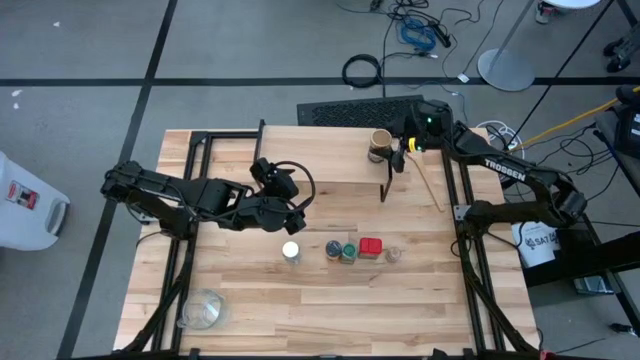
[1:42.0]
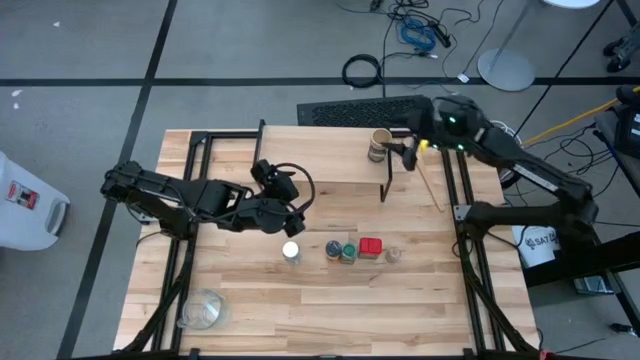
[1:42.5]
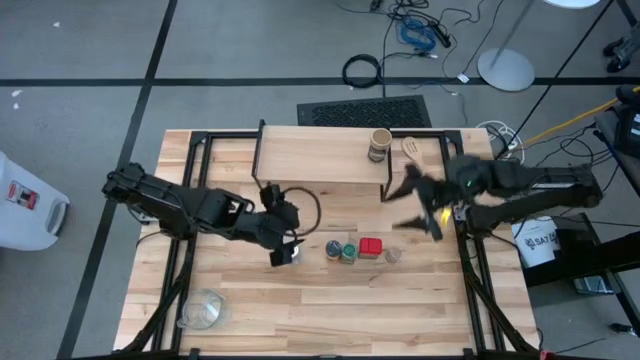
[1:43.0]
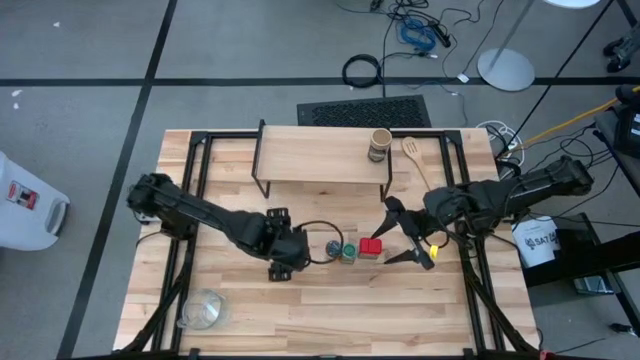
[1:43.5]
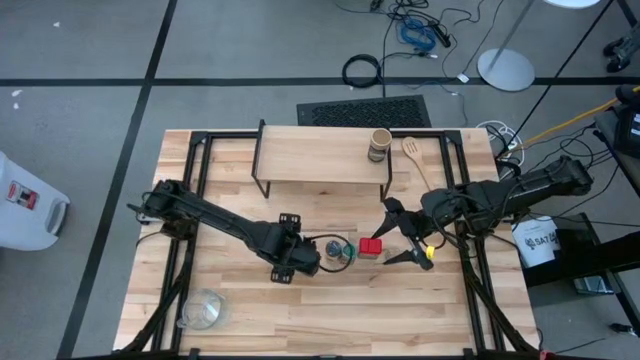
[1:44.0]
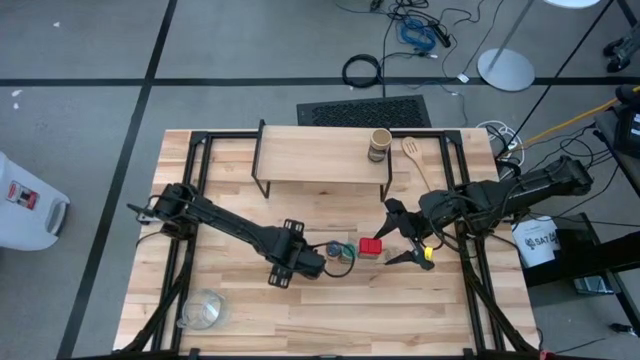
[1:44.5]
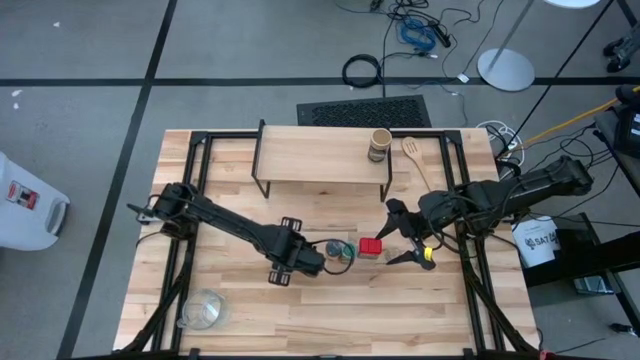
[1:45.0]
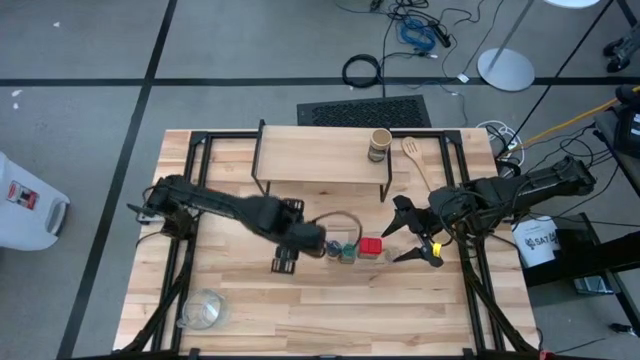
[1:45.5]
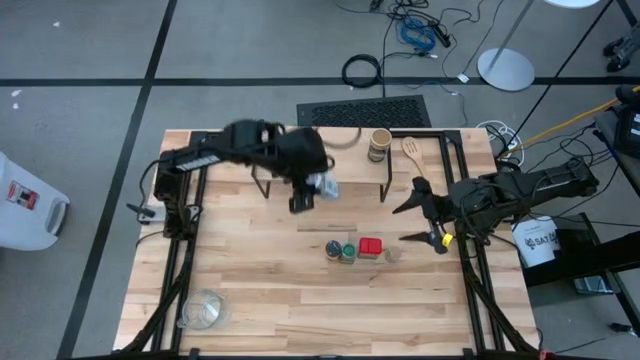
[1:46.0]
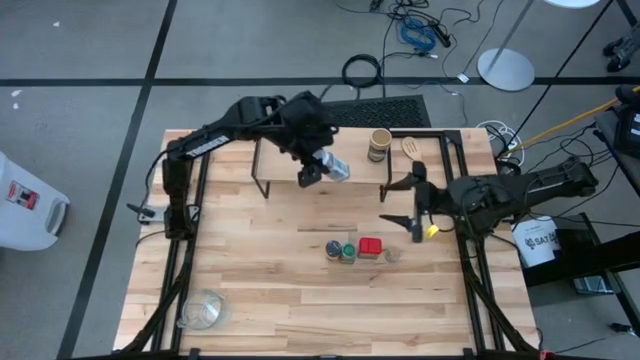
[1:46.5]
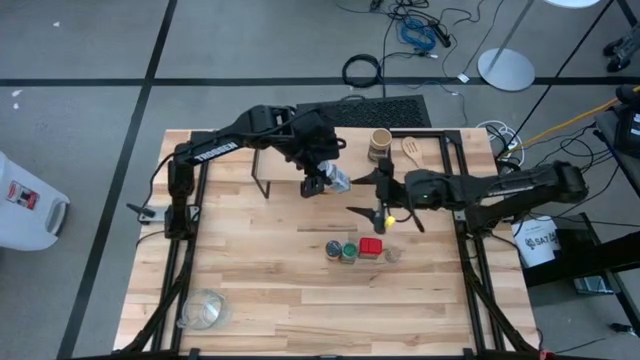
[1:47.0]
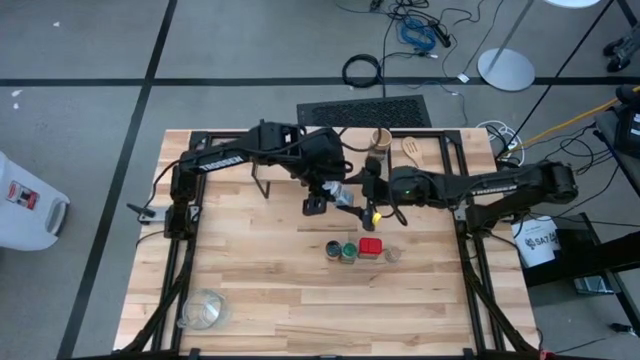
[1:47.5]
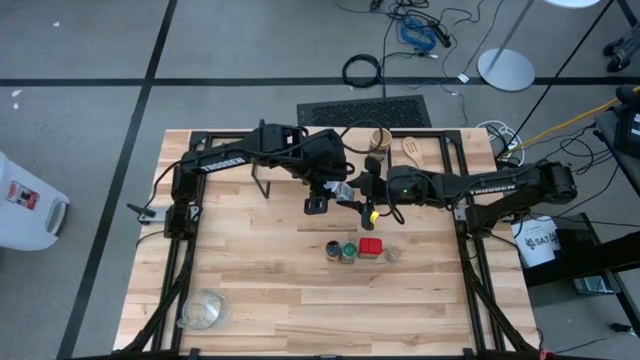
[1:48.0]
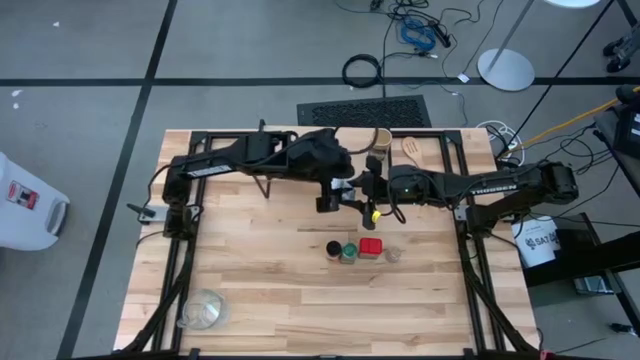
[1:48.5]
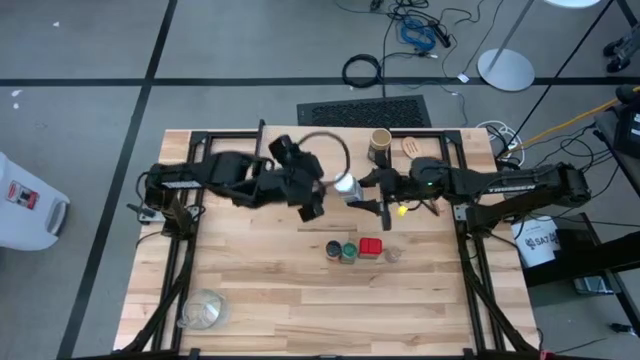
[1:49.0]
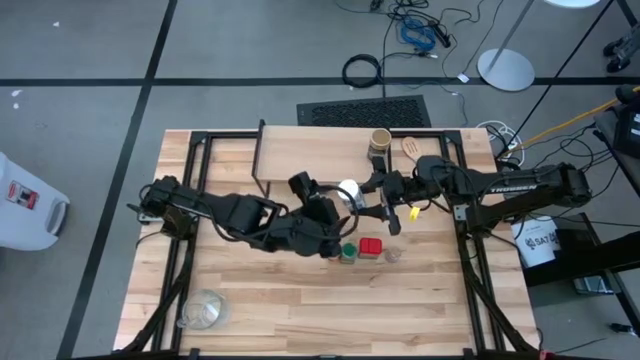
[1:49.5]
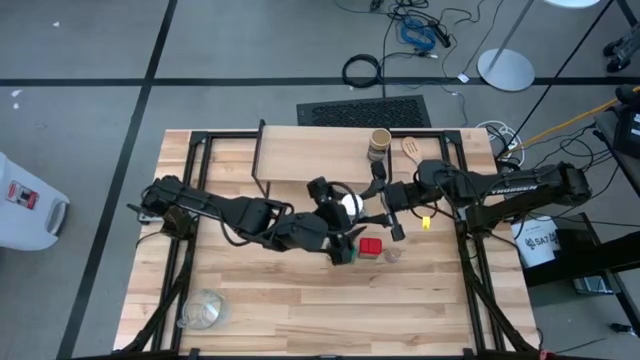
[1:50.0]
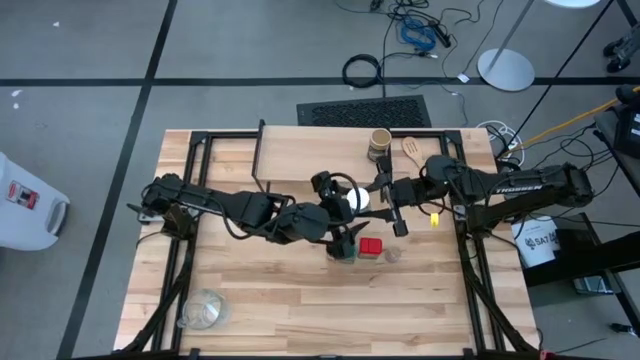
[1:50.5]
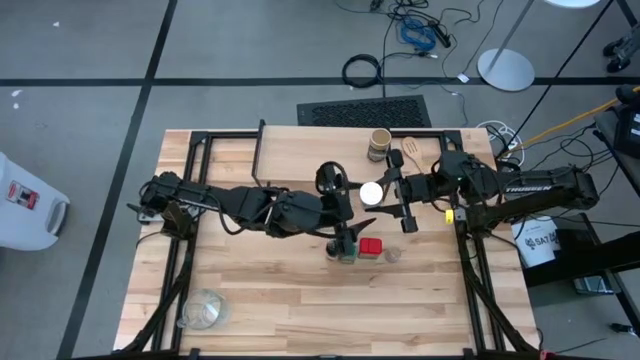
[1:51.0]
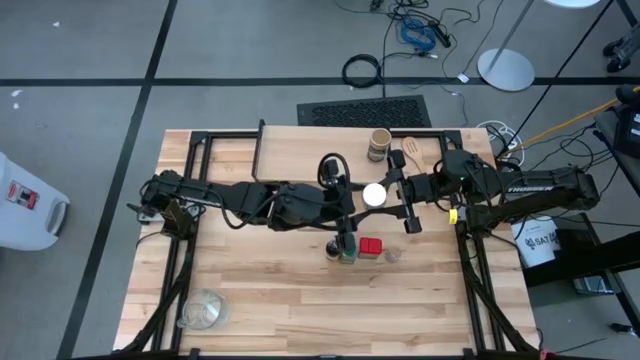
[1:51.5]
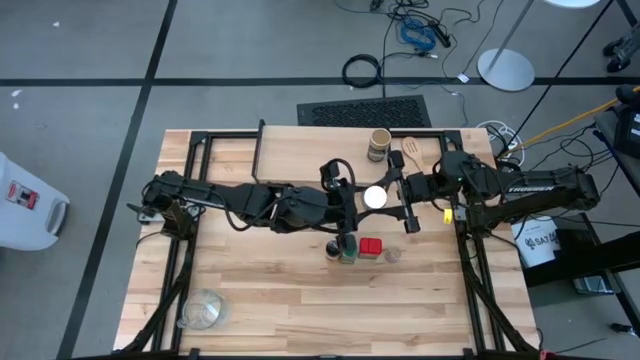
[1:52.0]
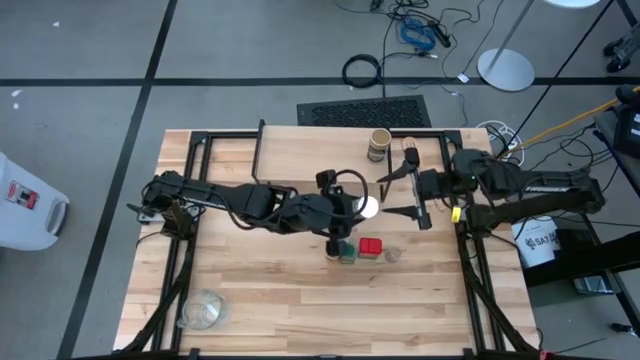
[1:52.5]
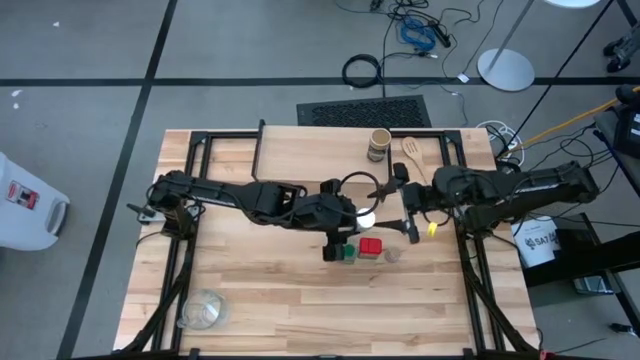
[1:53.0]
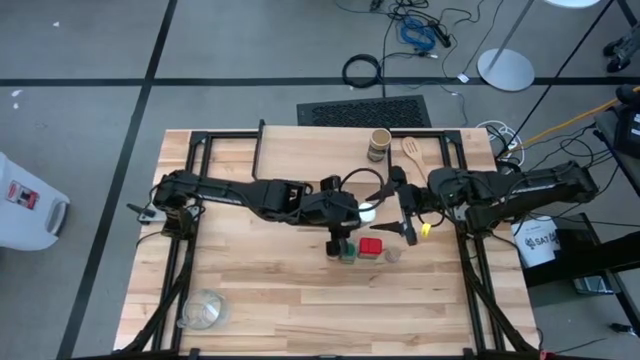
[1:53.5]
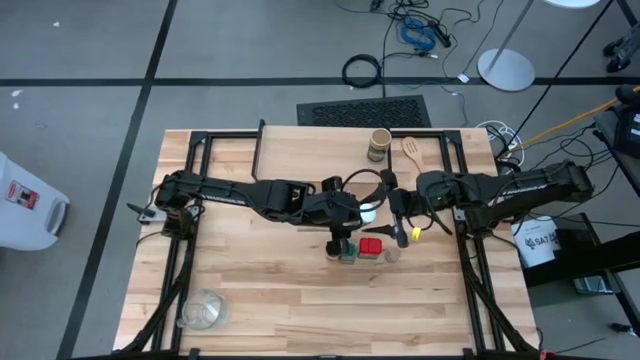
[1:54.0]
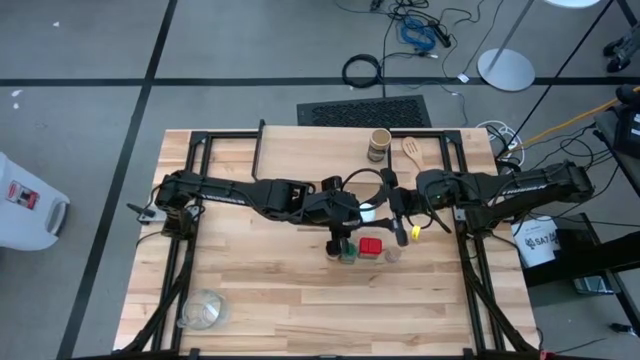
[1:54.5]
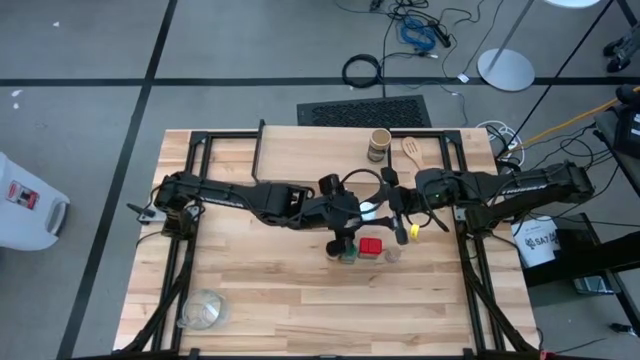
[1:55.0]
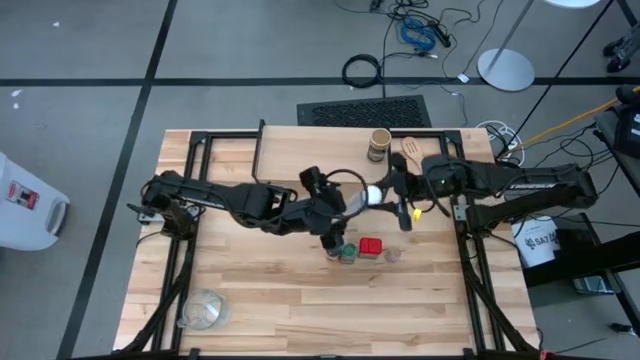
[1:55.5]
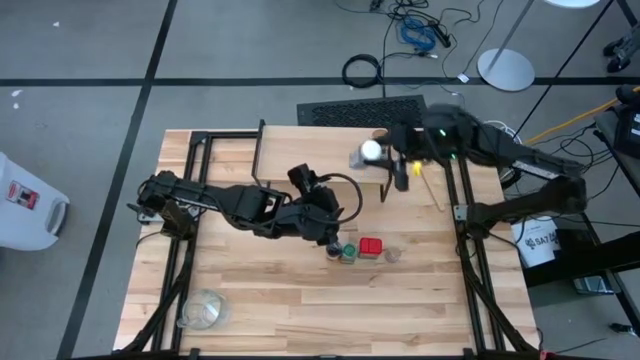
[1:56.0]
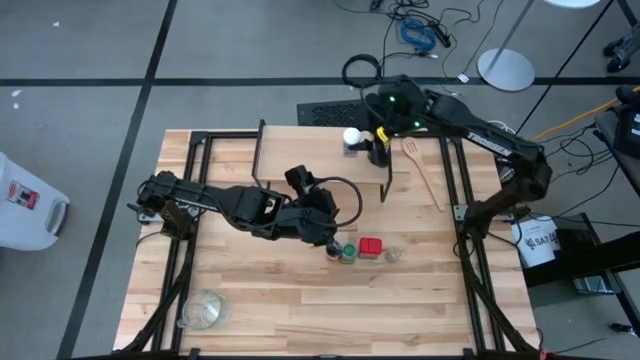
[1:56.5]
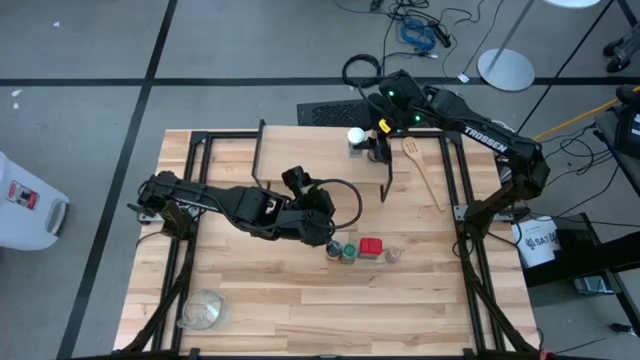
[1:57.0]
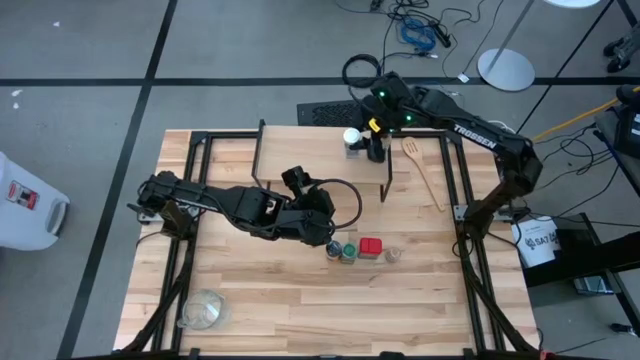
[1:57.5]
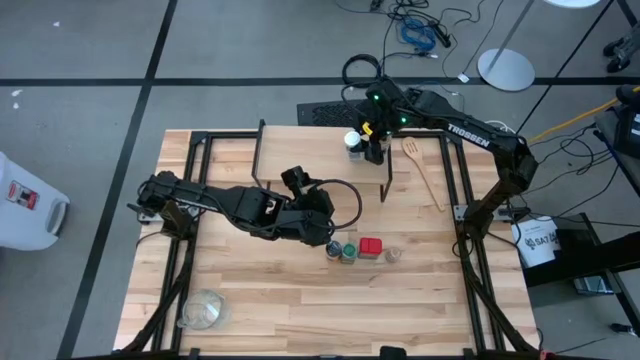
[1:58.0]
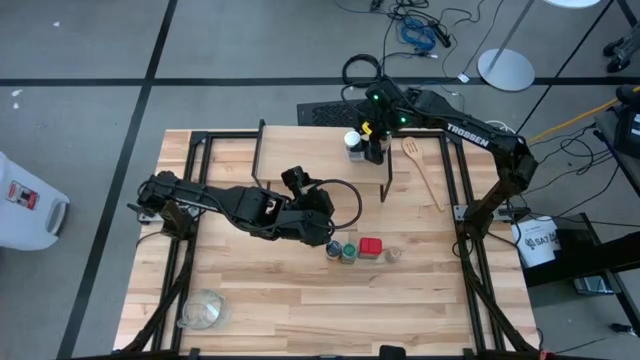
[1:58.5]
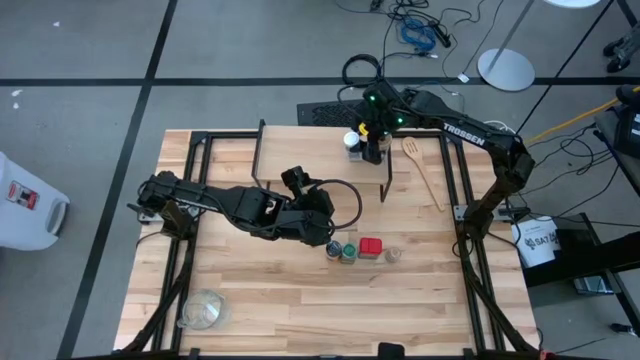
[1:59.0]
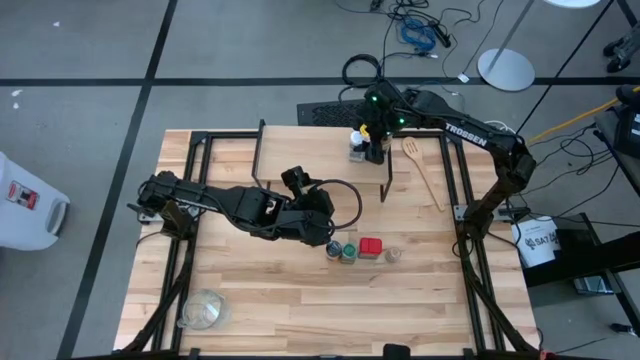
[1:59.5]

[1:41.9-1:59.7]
Task: Shelf spices
Put the white seasoning bottle on the shelf
